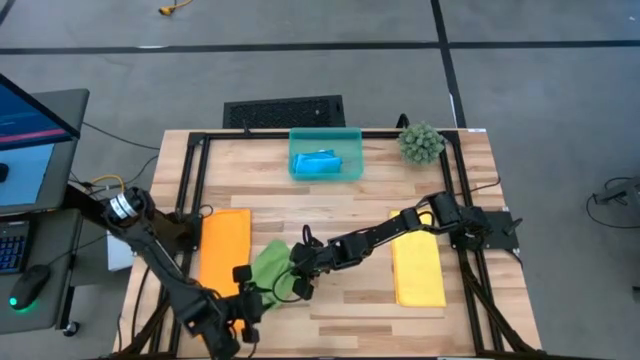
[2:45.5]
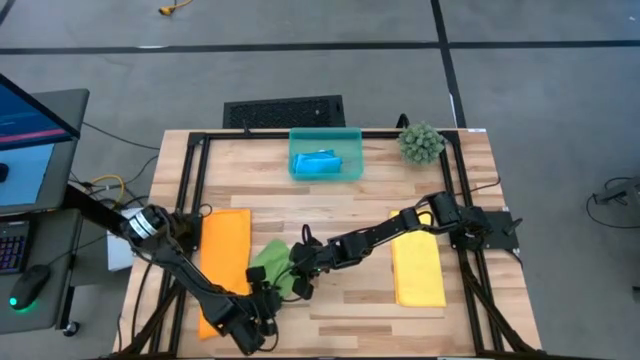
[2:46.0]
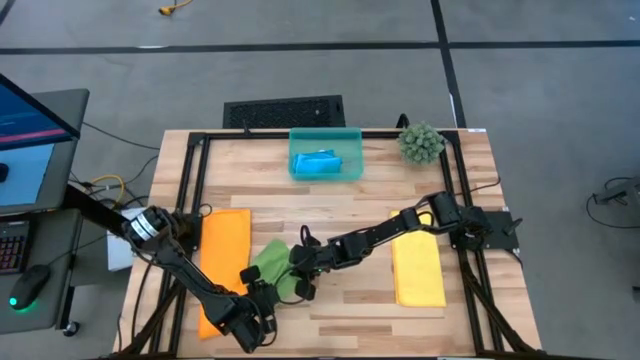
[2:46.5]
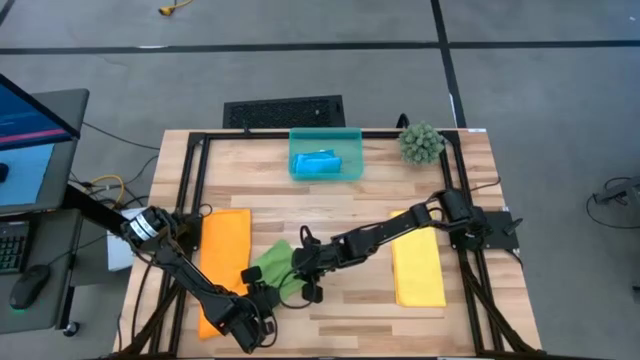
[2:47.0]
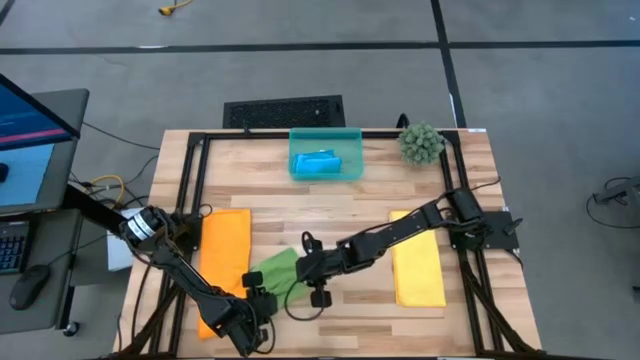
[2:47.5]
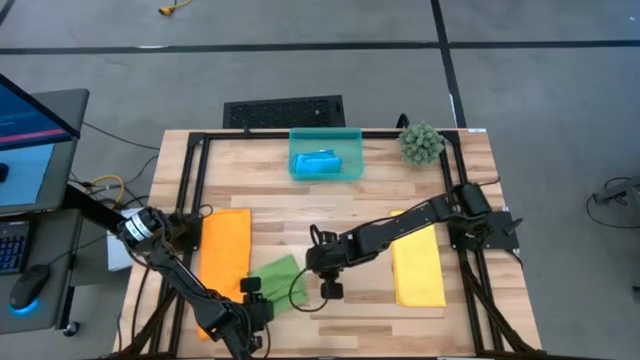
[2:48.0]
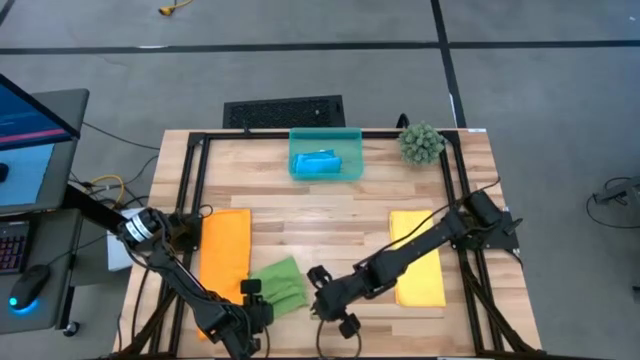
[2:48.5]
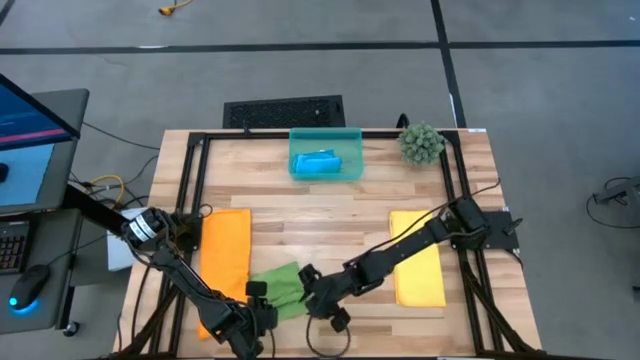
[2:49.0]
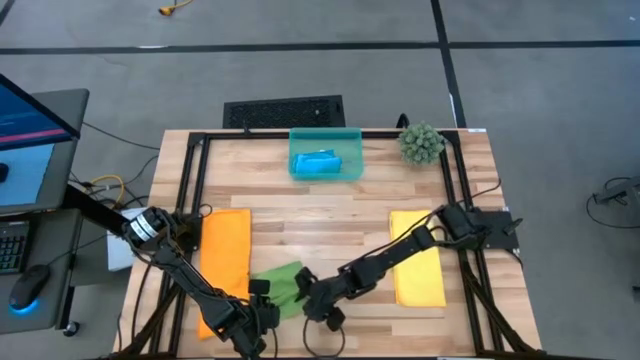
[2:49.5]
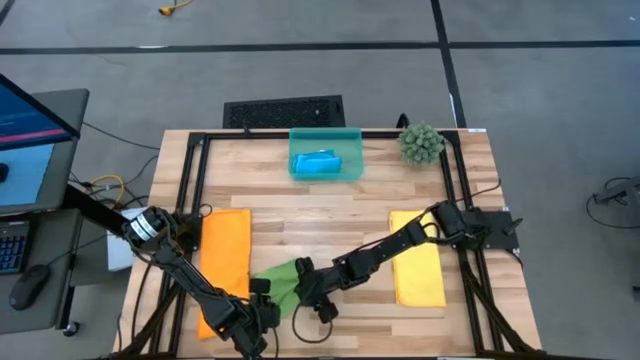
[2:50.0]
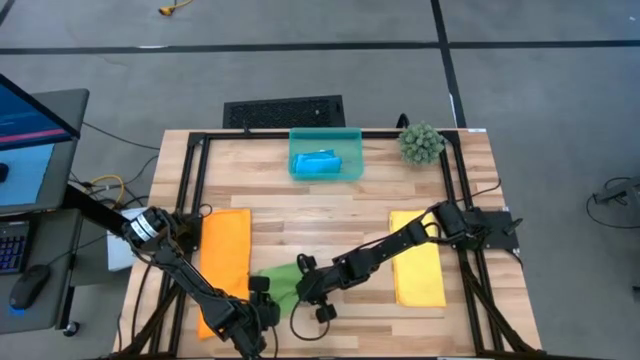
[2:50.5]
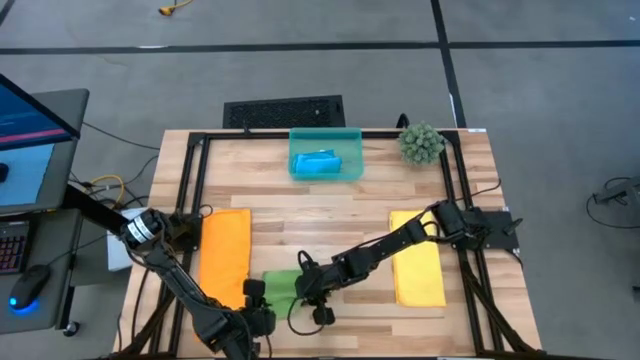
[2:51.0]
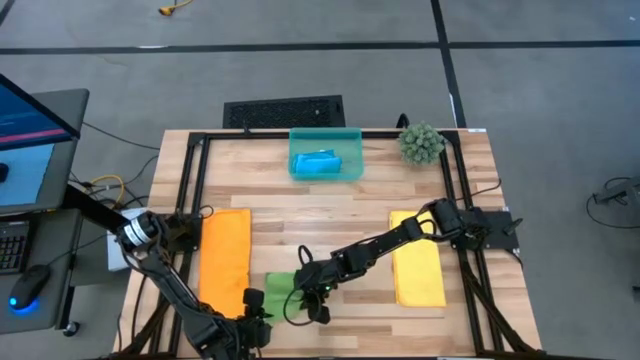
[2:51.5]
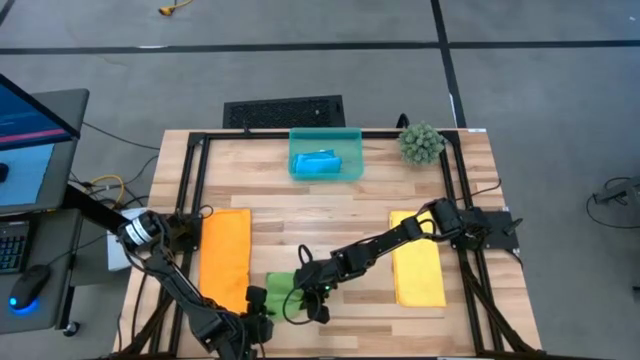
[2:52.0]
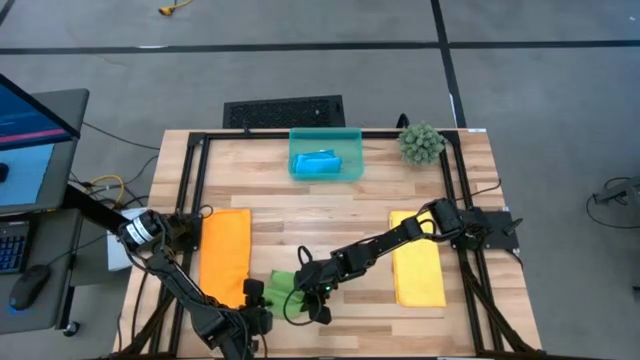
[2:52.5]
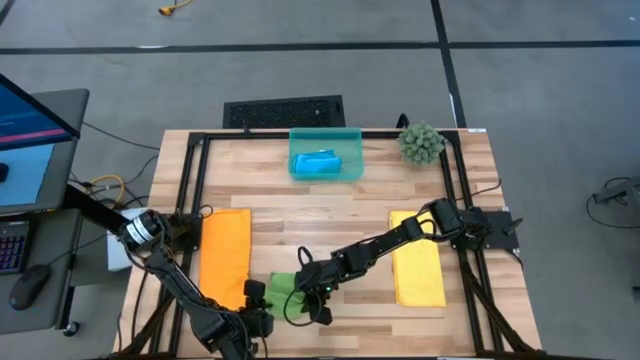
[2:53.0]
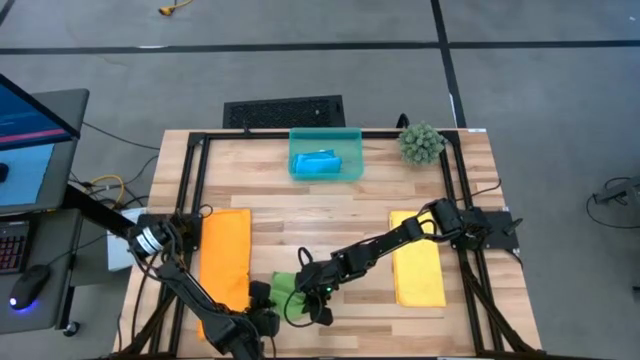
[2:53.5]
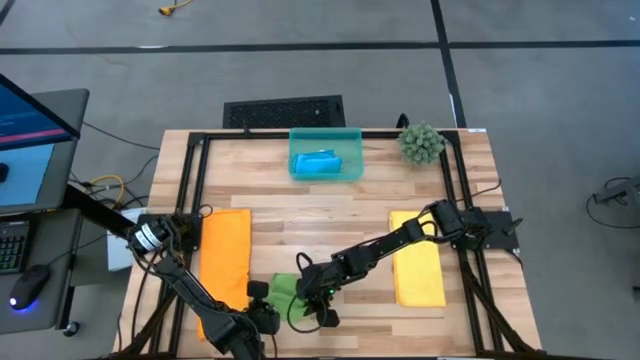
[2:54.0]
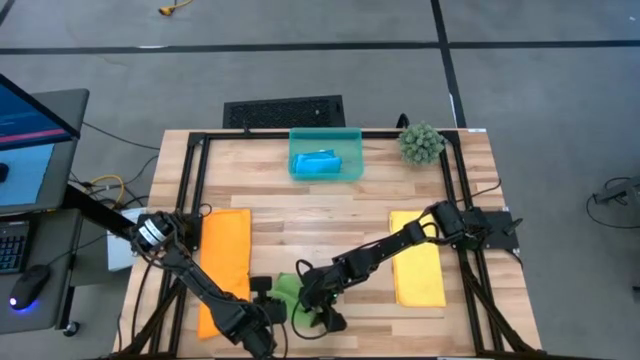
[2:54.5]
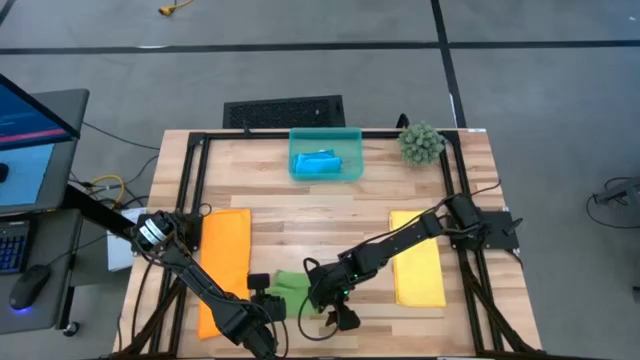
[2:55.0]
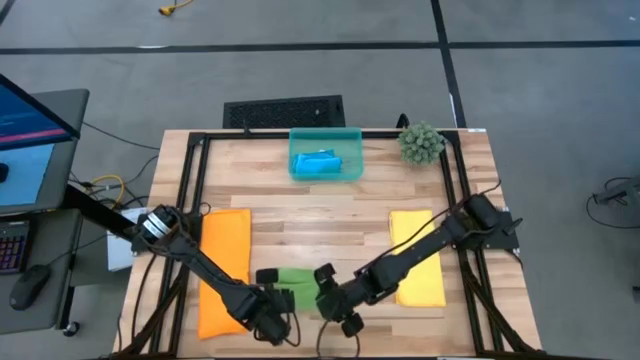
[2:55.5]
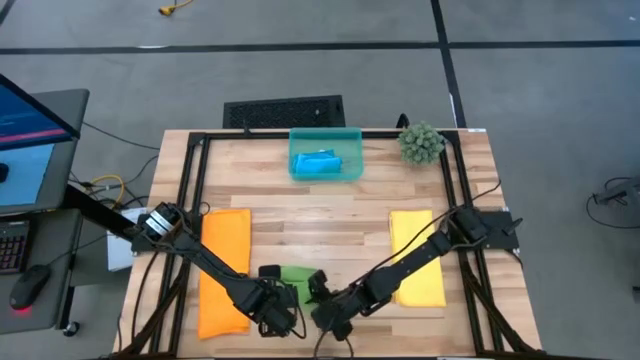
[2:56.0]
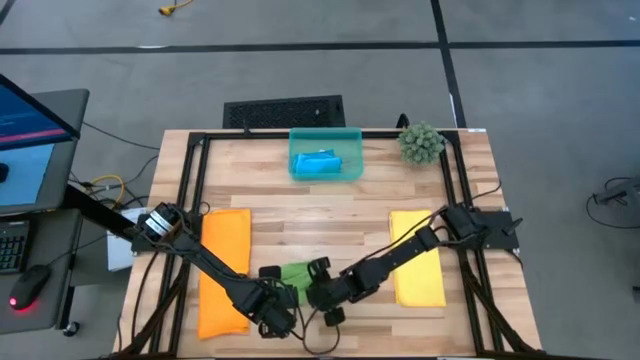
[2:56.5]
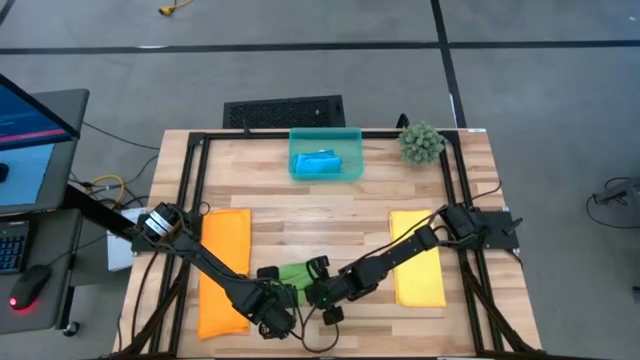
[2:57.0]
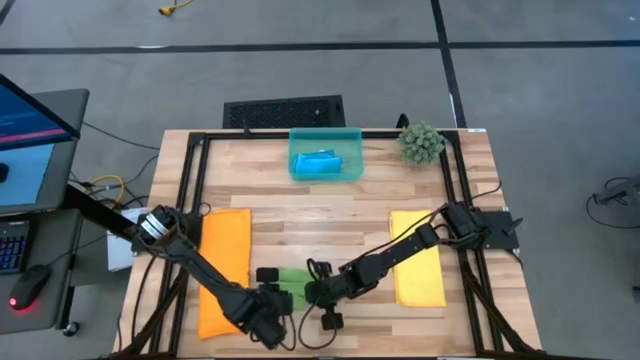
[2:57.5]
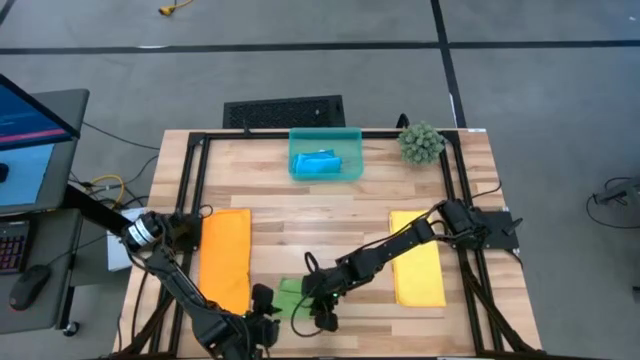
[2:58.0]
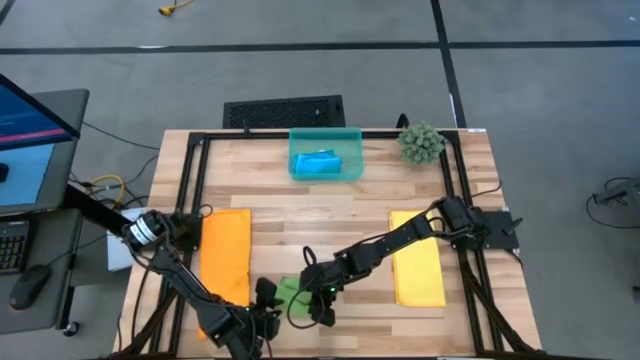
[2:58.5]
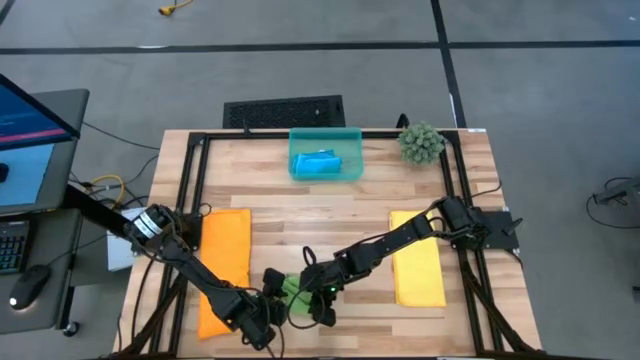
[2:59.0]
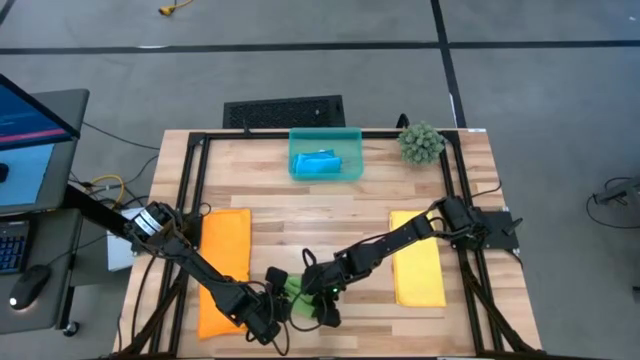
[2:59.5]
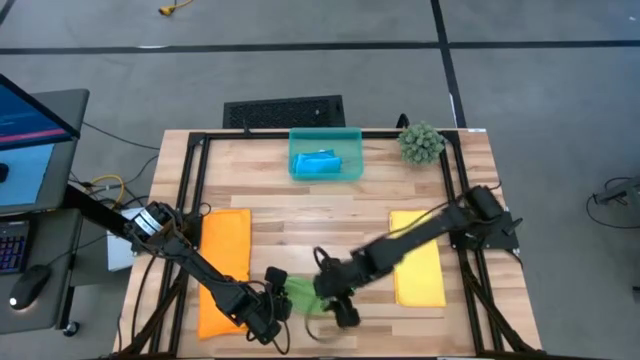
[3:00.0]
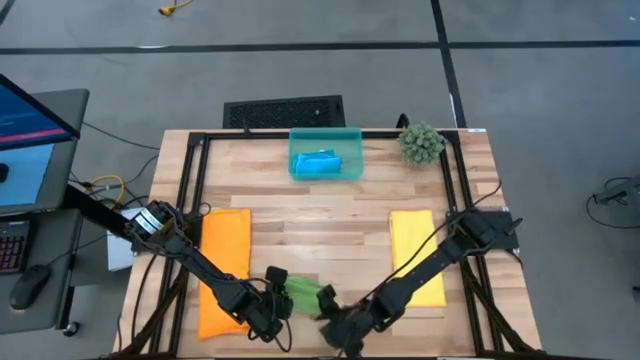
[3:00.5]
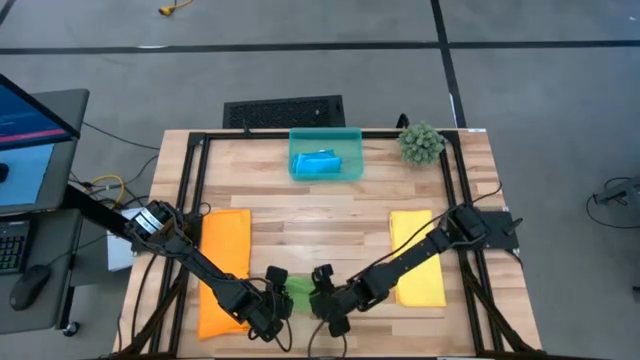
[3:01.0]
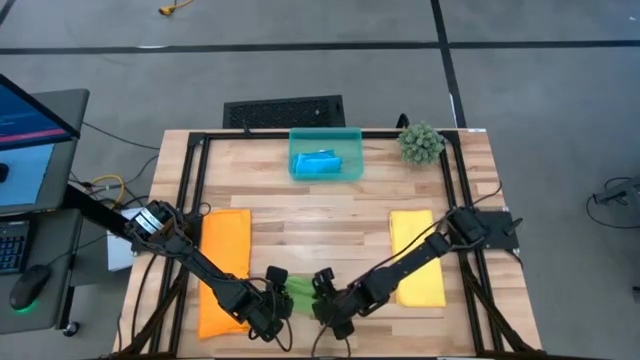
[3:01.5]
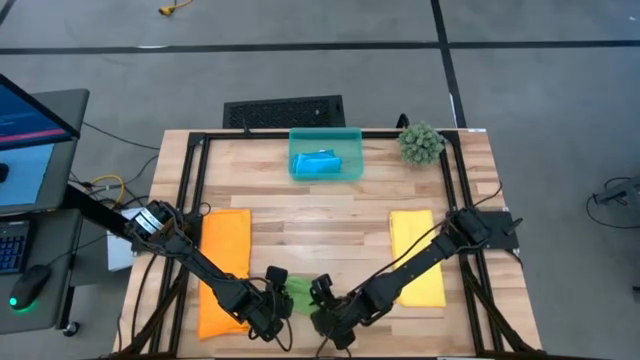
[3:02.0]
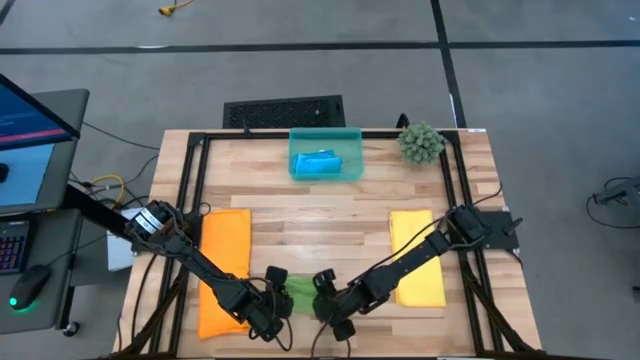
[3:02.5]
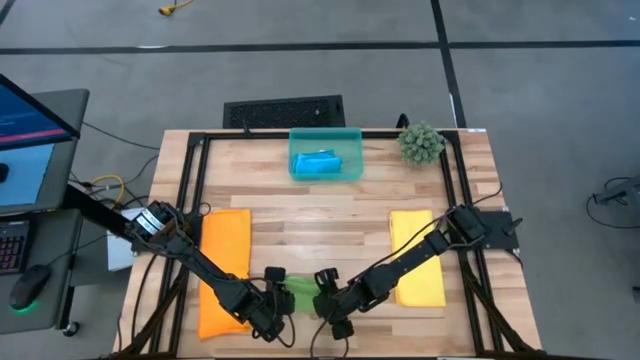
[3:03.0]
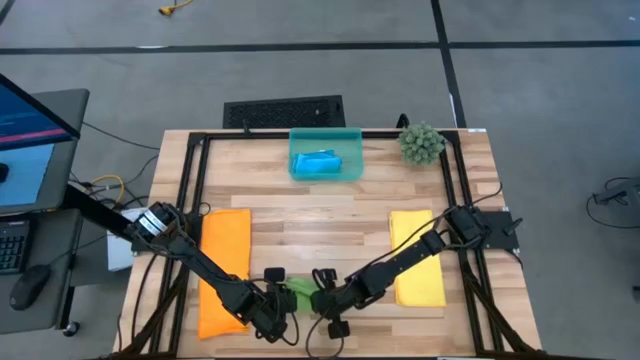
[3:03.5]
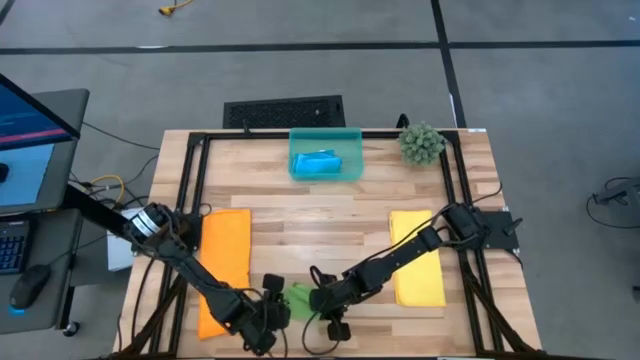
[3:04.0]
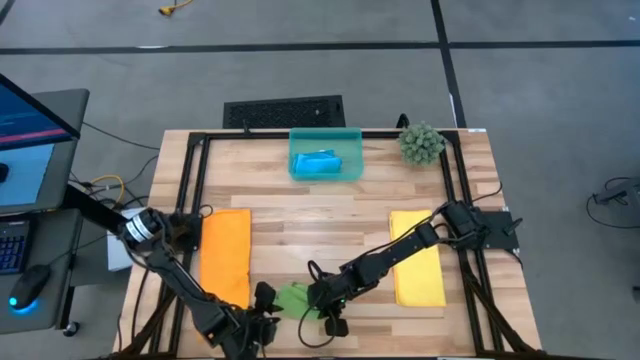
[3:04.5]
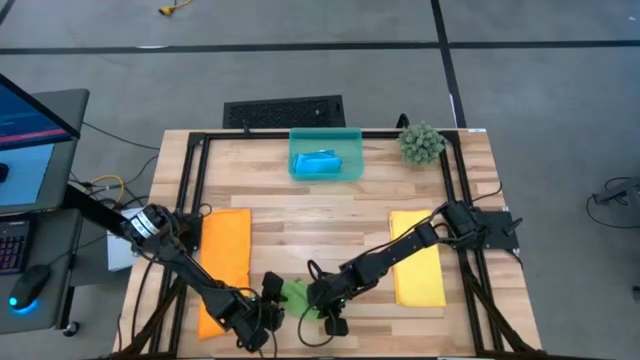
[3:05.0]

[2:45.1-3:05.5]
Task: Roll microfiber towels into tight, uniform cylinder then place into a basket
Roll the green towel

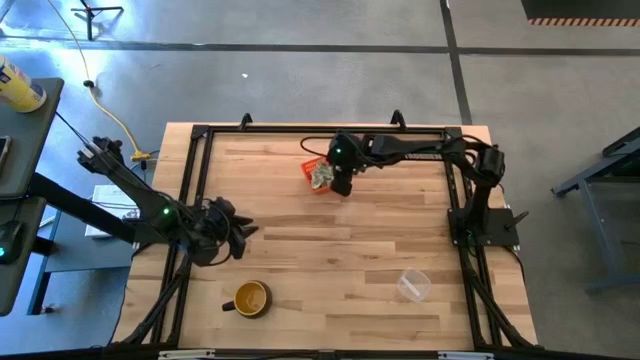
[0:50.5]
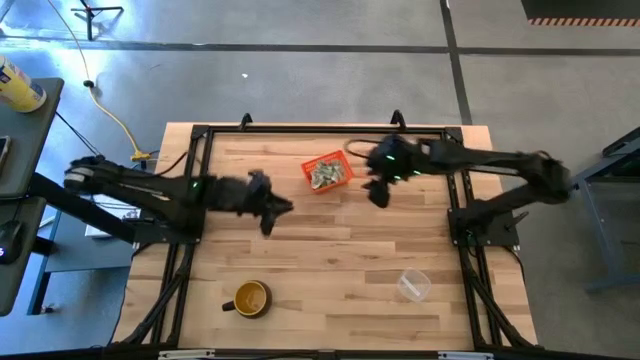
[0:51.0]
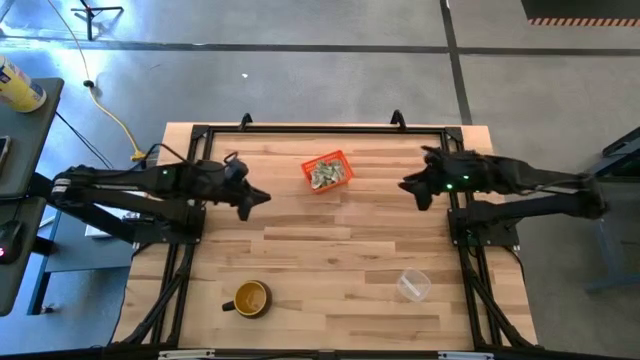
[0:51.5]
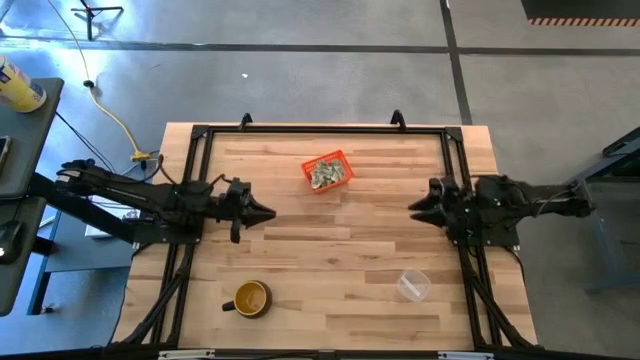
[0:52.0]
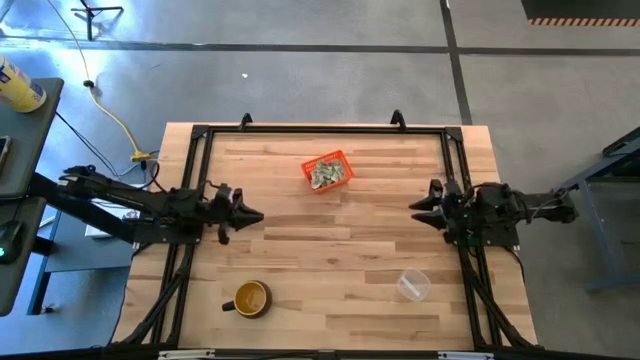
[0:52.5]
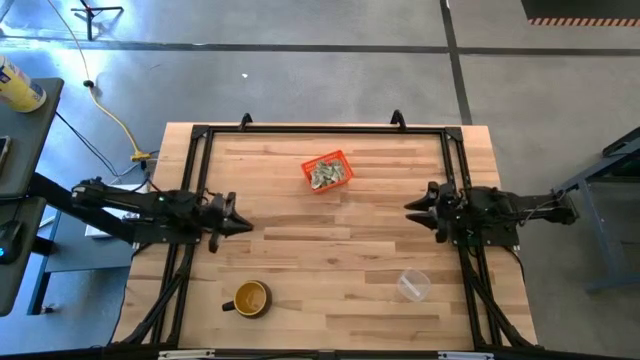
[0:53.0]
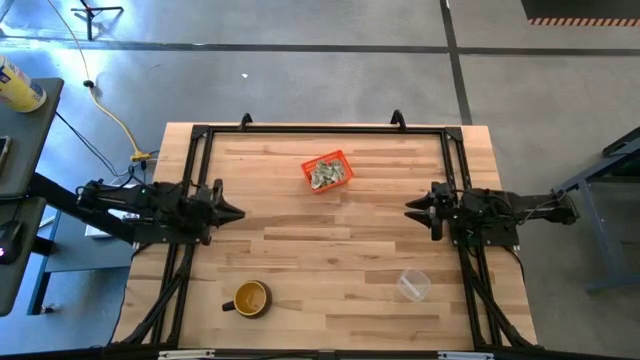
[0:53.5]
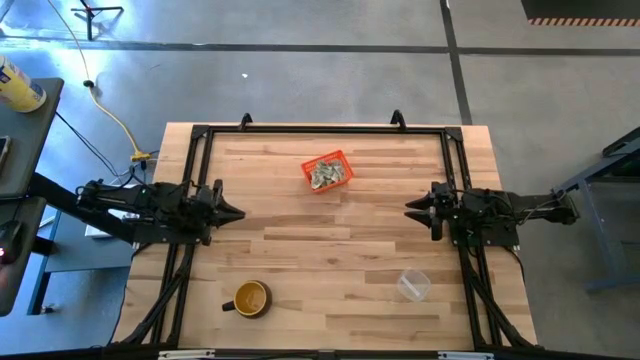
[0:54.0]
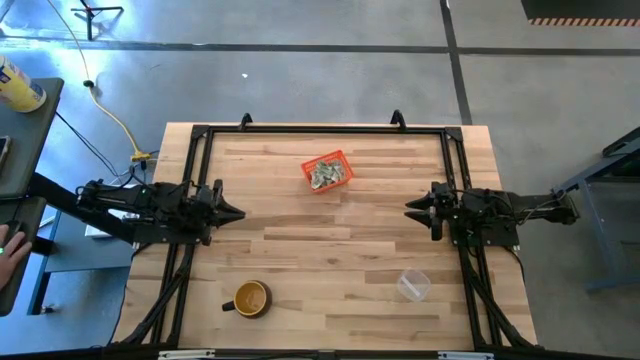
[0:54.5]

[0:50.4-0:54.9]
Task: Pick and place items into bin
Return to Home Position
